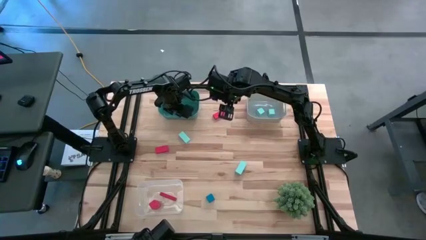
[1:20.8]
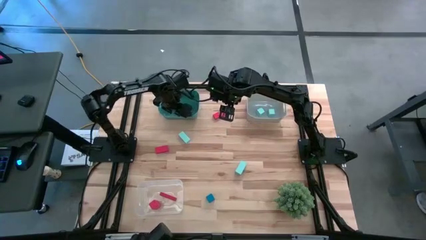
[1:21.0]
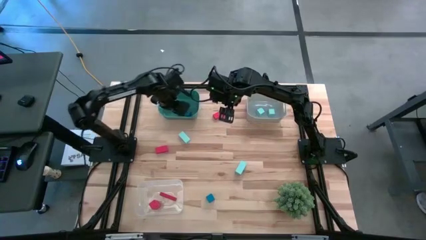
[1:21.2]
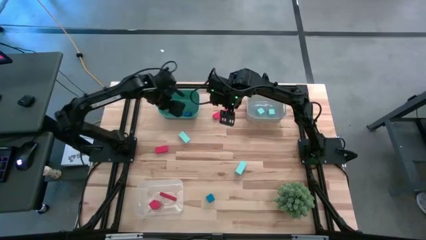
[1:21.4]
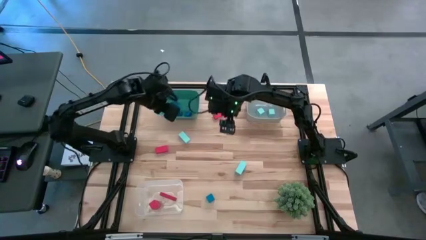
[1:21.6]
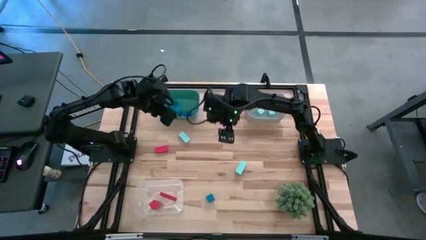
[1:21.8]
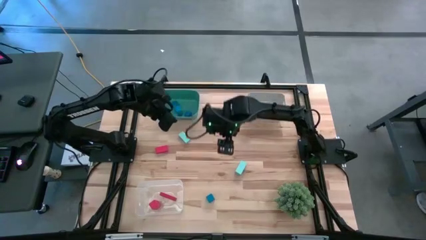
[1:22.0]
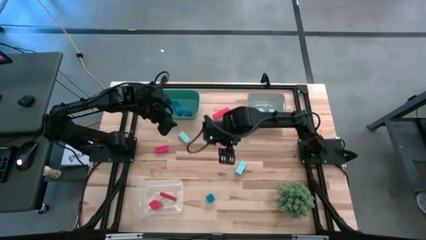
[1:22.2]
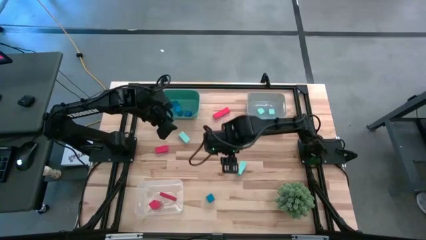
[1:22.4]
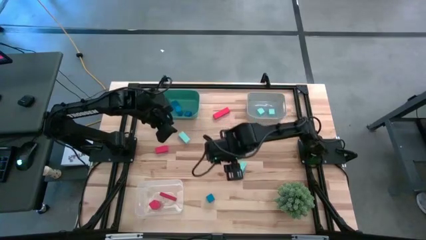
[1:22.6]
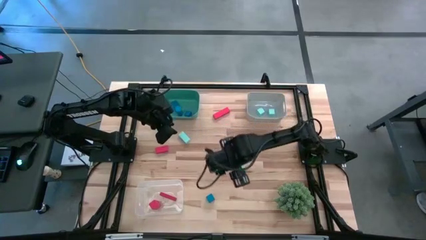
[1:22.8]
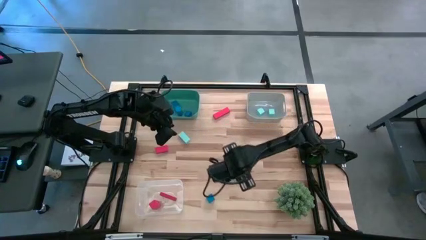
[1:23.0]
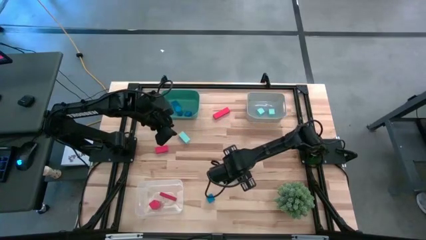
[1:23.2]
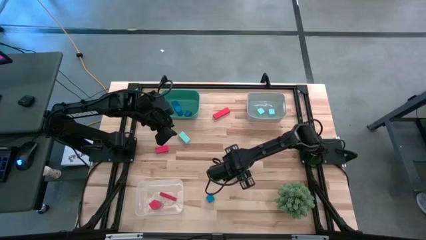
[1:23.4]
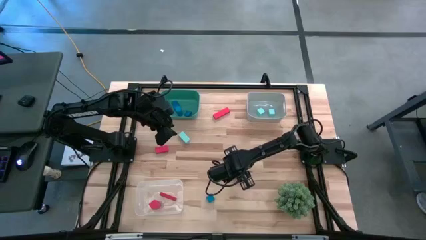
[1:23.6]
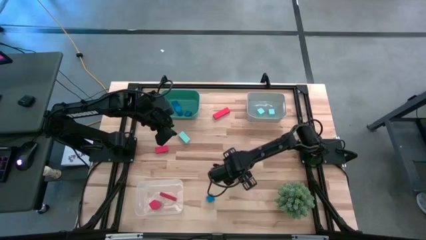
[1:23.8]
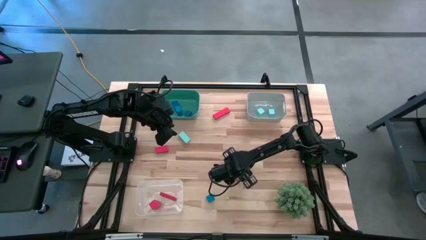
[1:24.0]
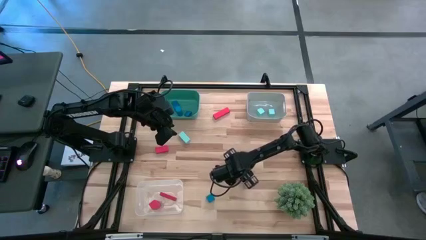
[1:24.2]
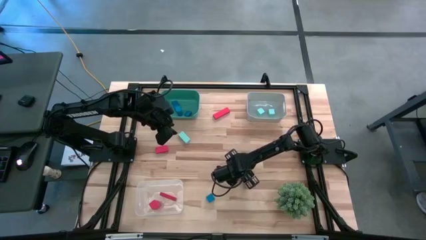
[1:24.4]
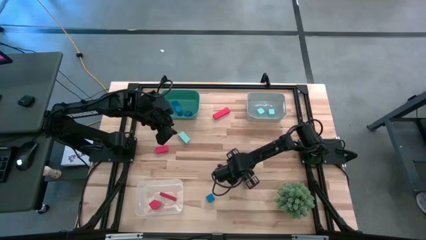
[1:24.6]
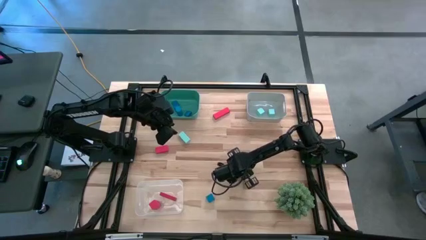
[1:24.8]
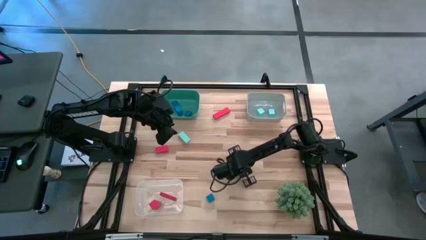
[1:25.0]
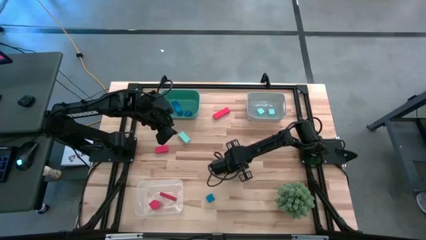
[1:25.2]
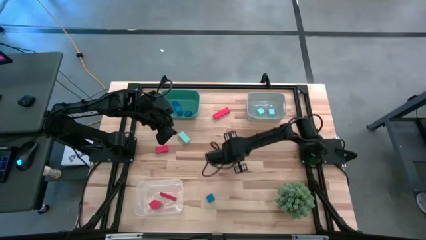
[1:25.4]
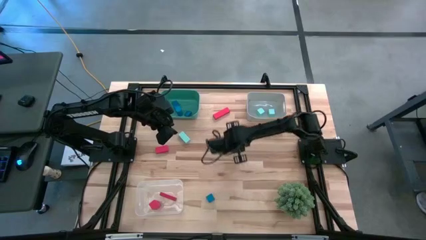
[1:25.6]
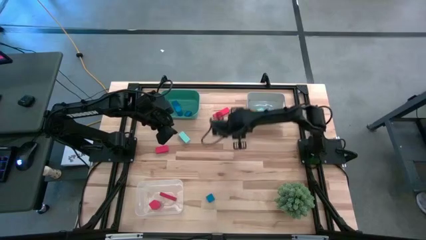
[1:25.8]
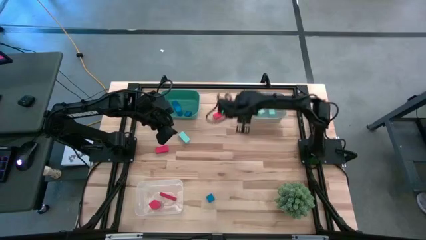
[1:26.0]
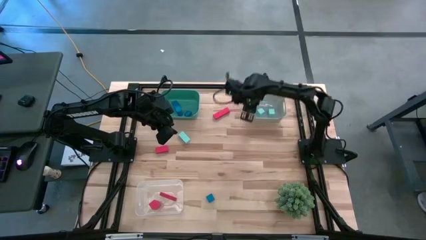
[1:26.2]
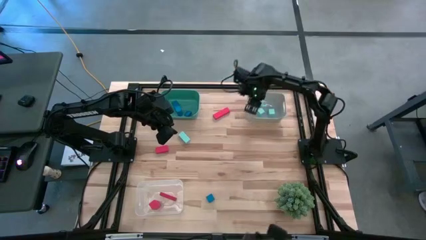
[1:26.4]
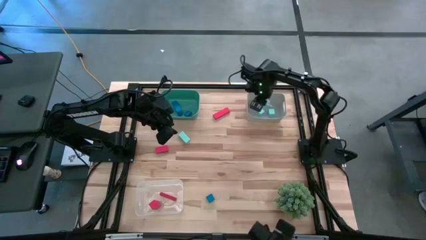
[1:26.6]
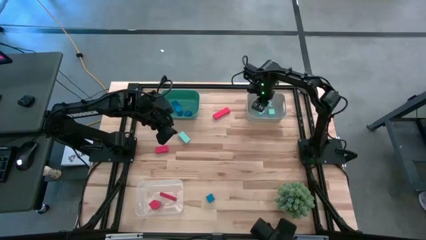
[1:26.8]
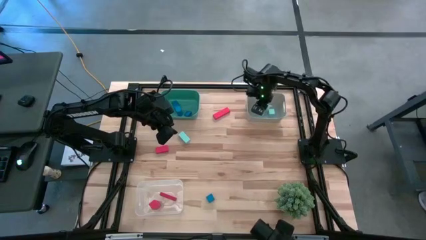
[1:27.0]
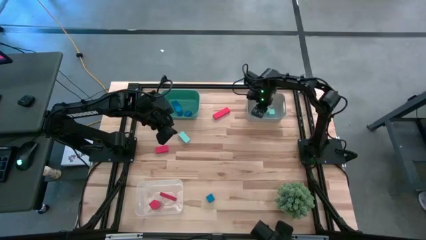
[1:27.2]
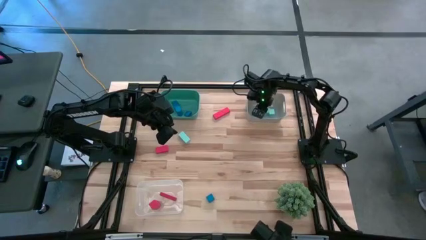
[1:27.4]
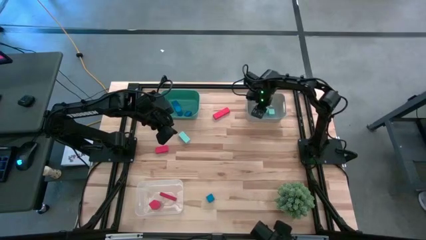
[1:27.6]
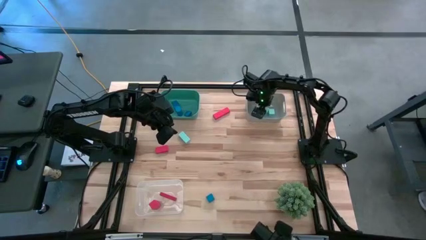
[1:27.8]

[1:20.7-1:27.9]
Task: Sort & place blocks by color
Put the light blue block into the grey bin

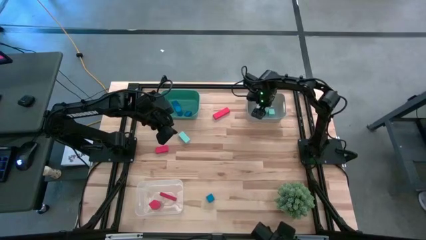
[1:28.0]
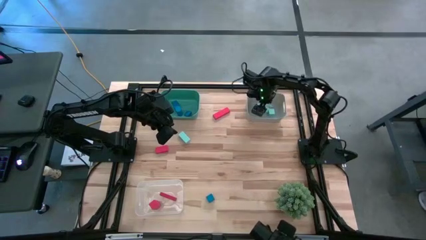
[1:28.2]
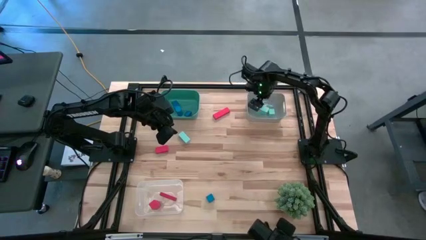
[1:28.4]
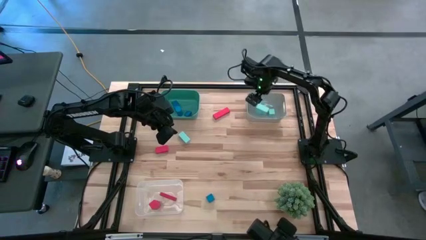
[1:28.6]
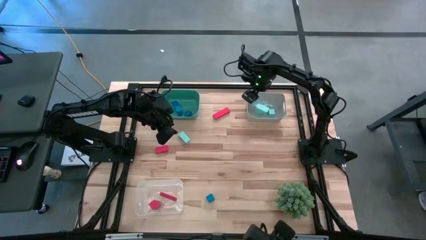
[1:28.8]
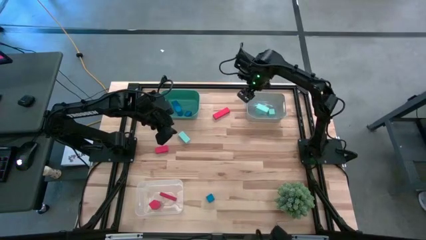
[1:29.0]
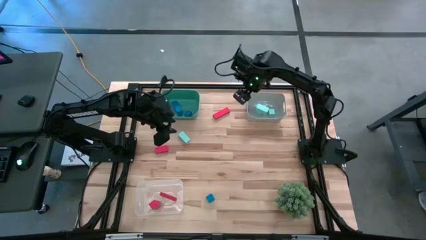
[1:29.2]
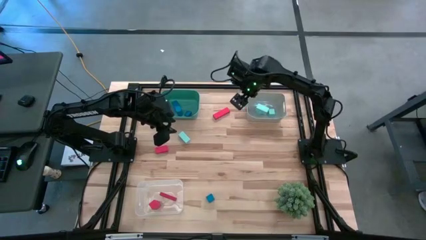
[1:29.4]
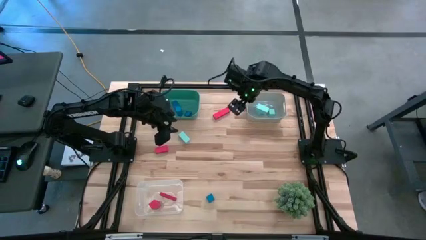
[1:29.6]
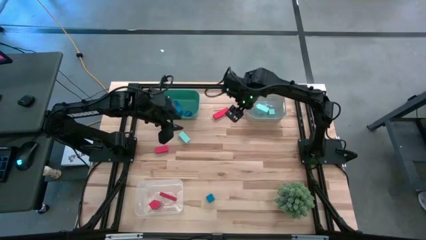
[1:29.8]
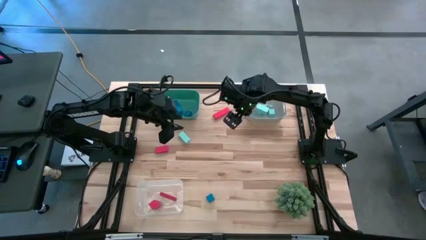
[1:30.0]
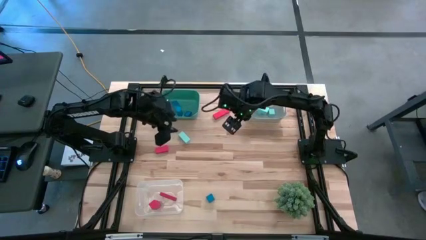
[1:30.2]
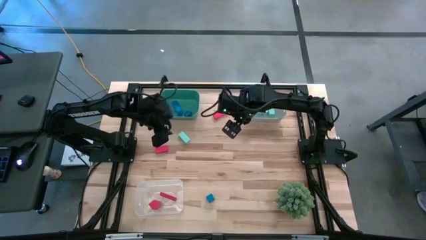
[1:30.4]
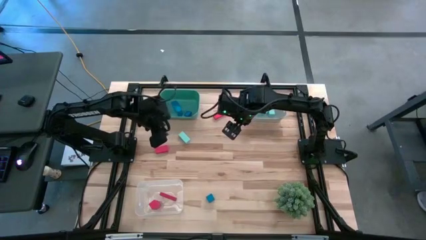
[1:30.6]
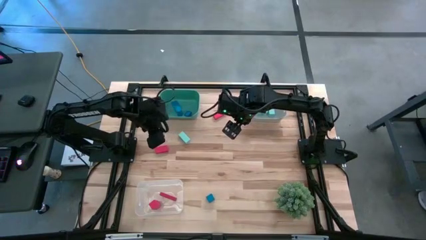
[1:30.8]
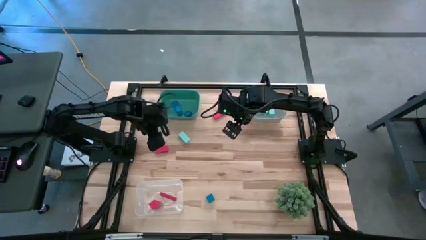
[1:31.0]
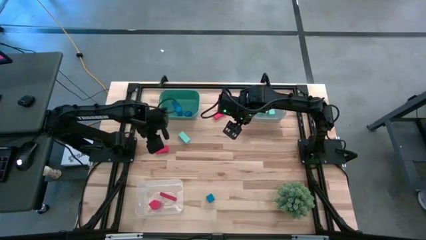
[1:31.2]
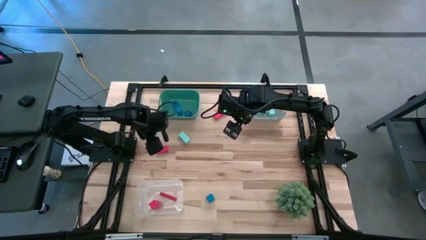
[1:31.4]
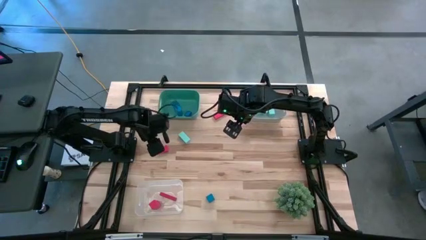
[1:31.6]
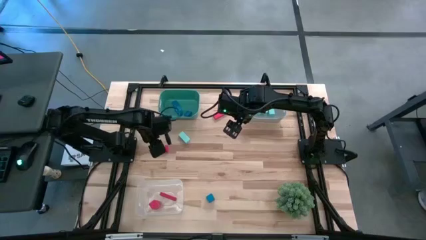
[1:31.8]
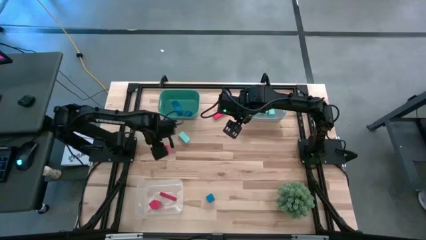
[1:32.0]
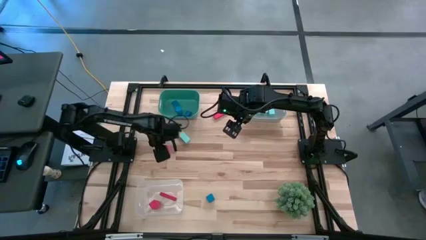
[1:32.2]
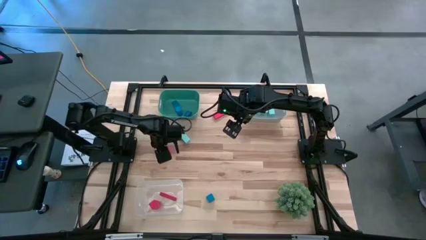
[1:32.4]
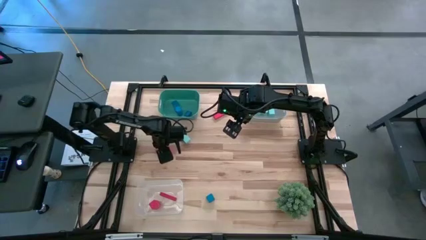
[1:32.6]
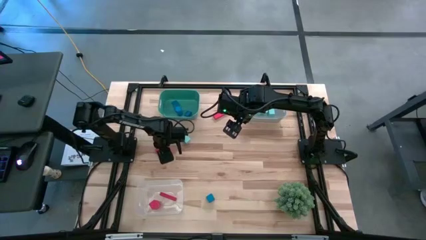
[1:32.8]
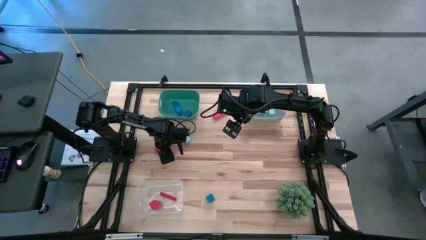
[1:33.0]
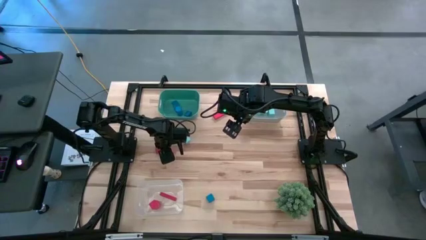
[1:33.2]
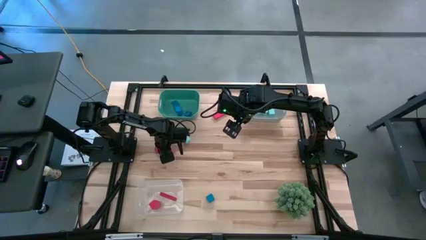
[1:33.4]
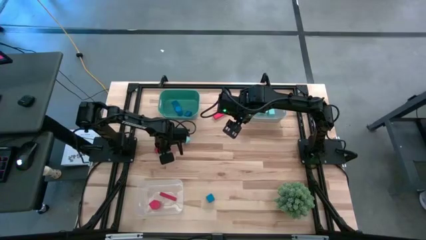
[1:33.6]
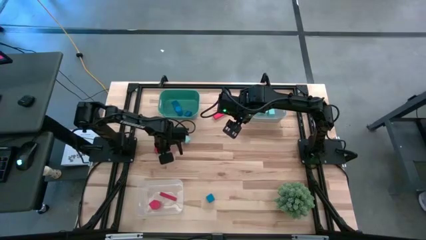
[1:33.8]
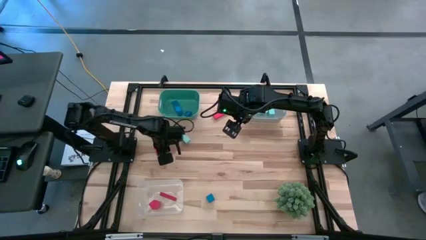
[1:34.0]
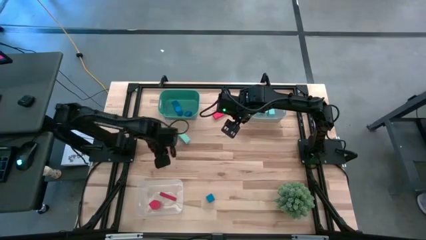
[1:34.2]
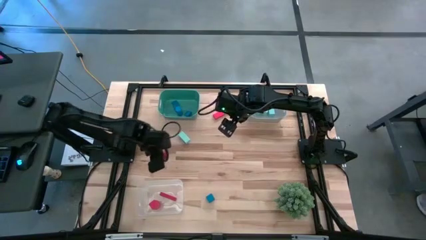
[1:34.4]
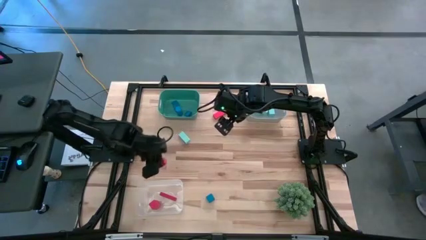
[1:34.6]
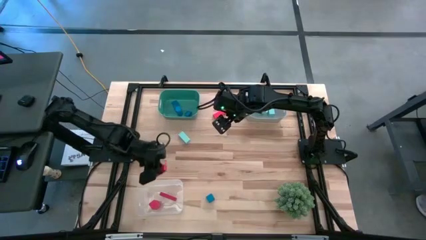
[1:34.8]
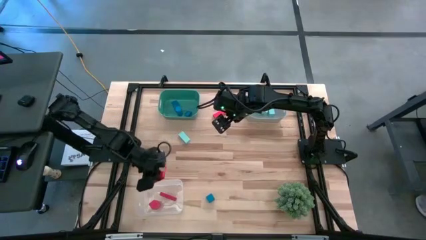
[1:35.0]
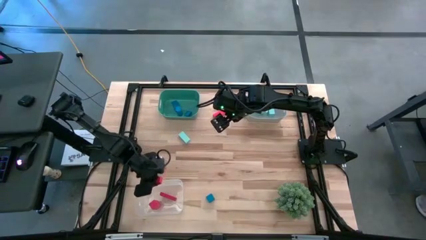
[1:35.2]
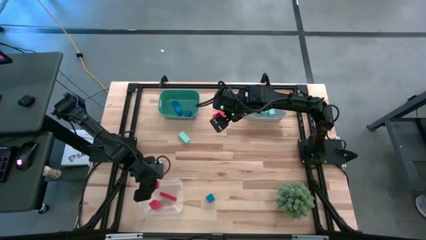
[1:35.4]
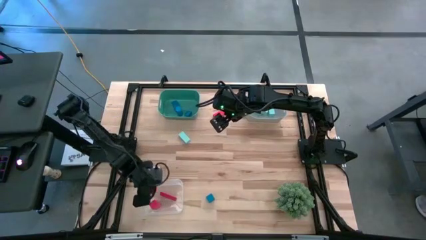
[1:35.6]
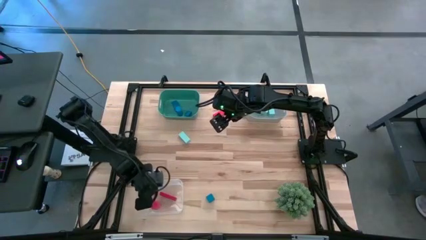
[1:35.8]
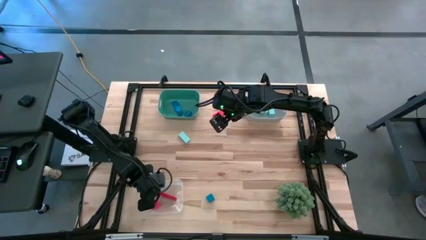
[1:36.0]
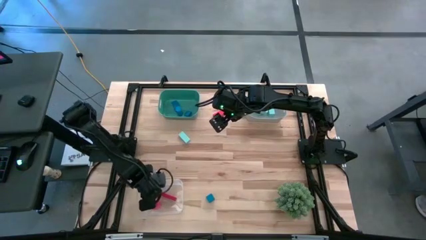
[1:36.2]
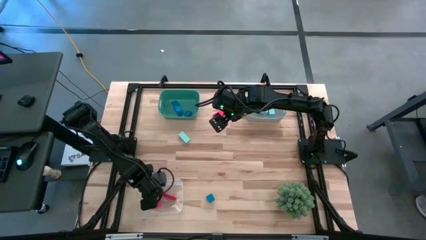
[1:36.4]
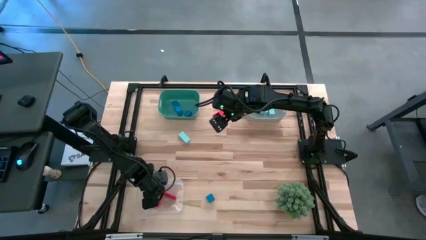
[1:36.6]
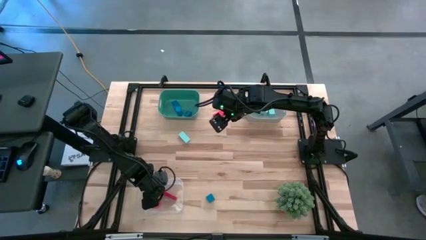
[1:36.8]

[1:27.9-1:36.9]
Put the red block into the transparent bin
